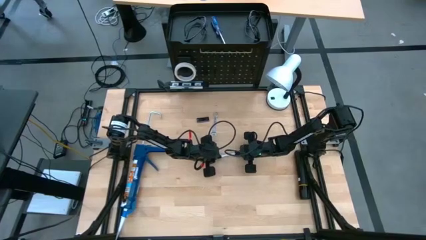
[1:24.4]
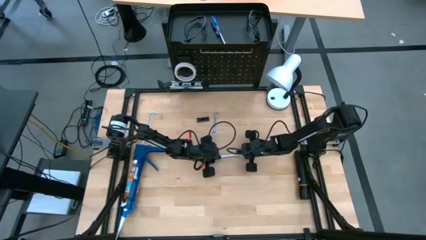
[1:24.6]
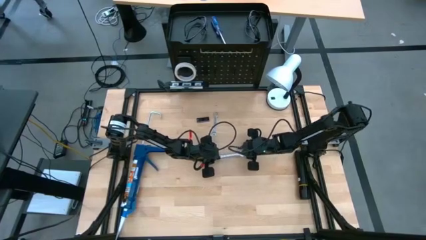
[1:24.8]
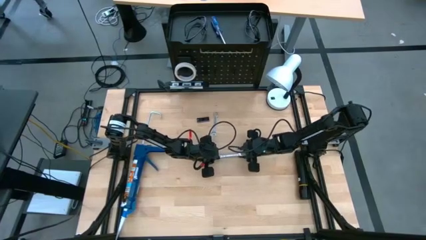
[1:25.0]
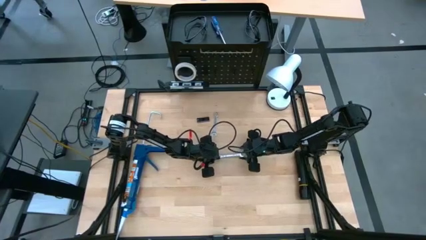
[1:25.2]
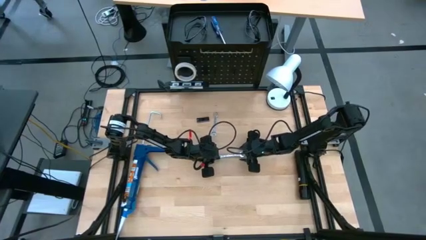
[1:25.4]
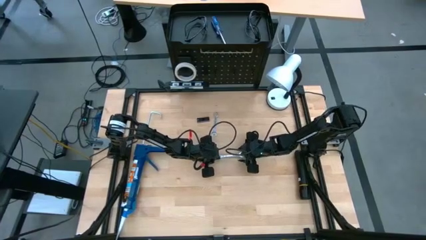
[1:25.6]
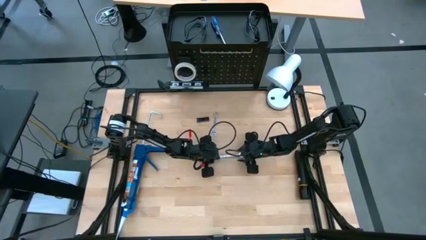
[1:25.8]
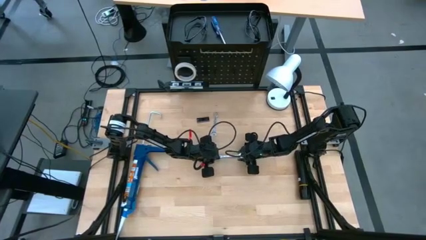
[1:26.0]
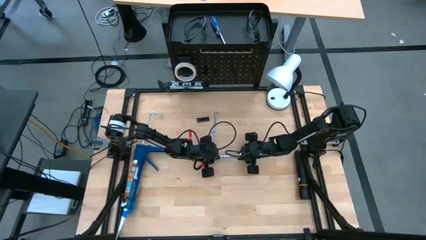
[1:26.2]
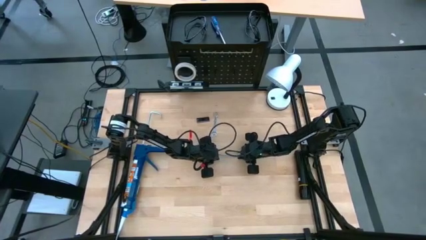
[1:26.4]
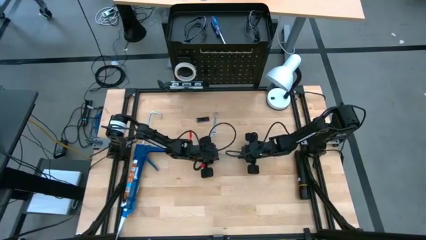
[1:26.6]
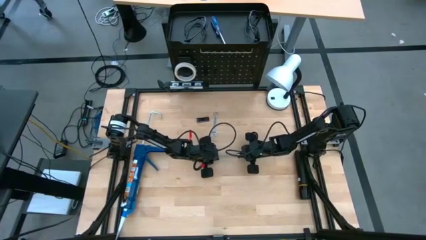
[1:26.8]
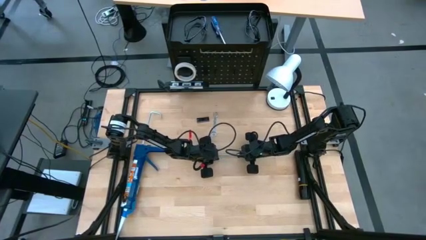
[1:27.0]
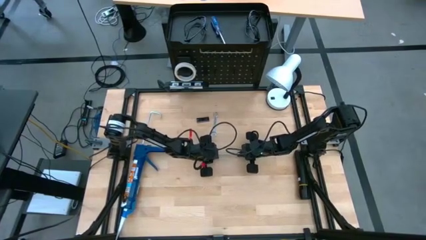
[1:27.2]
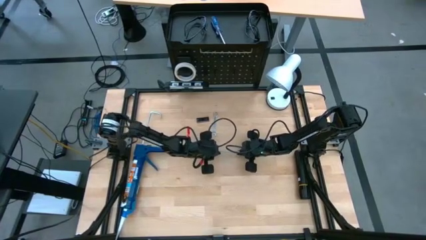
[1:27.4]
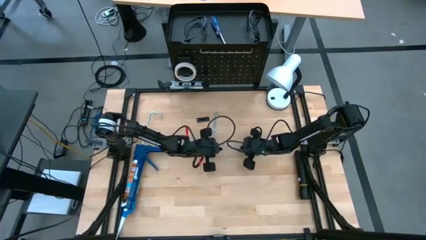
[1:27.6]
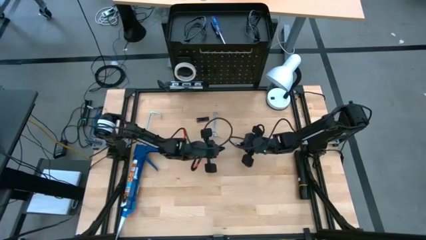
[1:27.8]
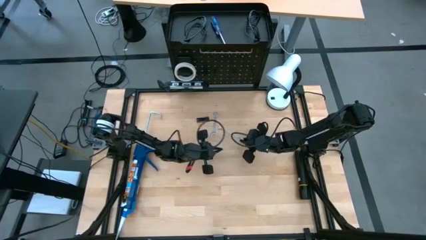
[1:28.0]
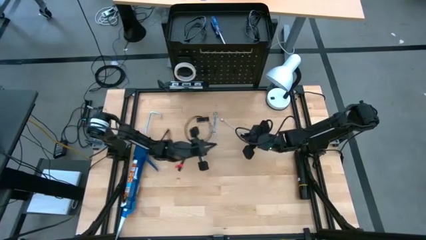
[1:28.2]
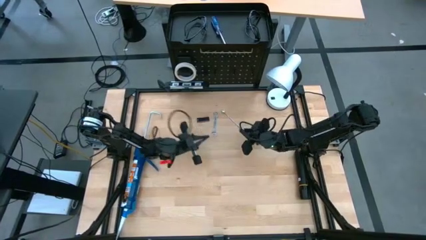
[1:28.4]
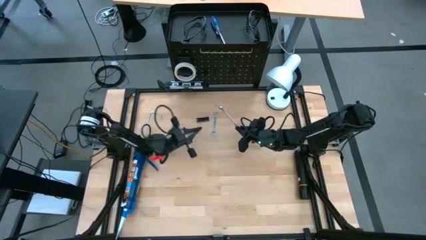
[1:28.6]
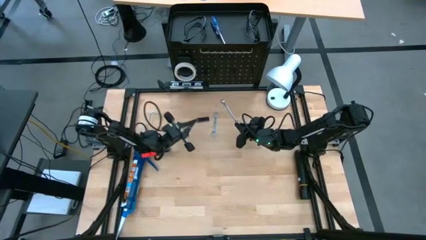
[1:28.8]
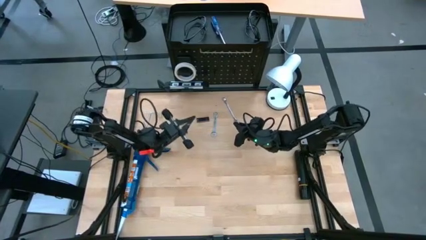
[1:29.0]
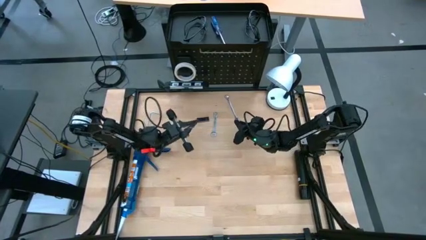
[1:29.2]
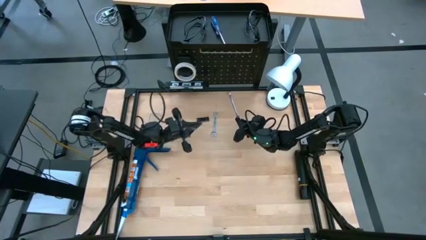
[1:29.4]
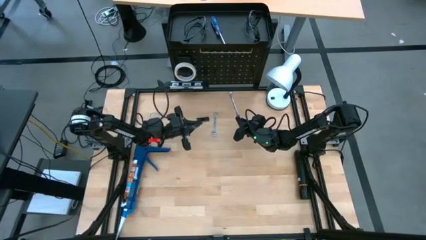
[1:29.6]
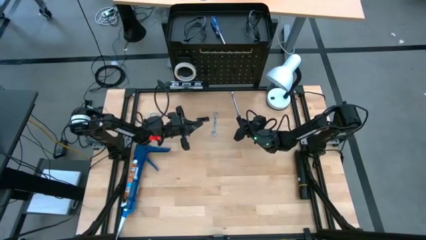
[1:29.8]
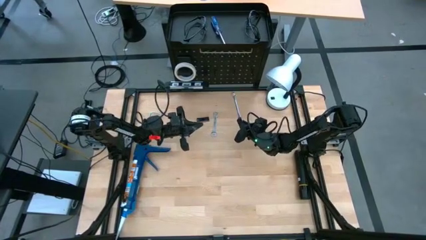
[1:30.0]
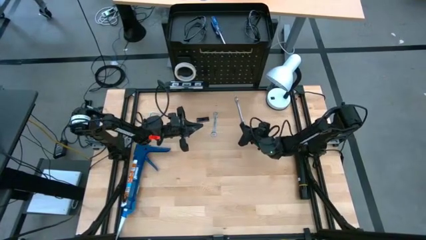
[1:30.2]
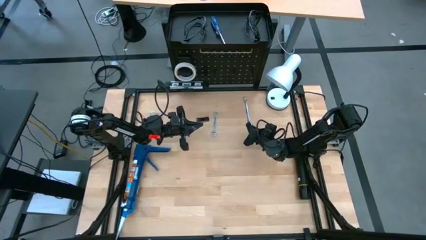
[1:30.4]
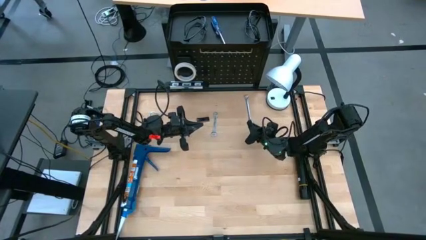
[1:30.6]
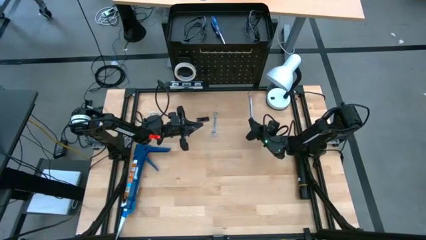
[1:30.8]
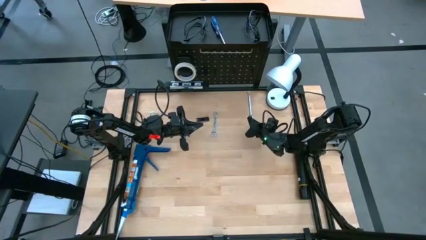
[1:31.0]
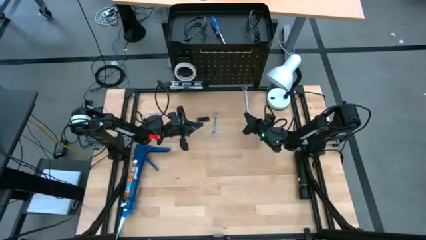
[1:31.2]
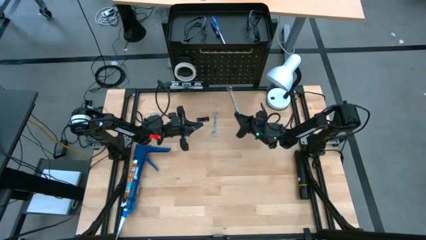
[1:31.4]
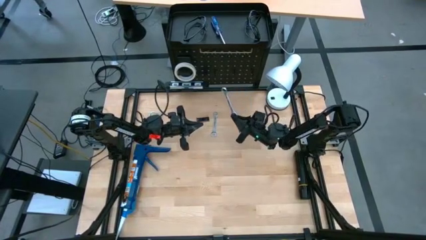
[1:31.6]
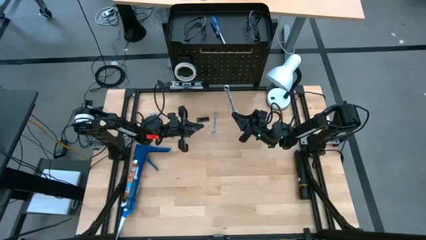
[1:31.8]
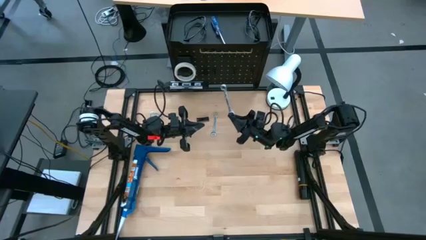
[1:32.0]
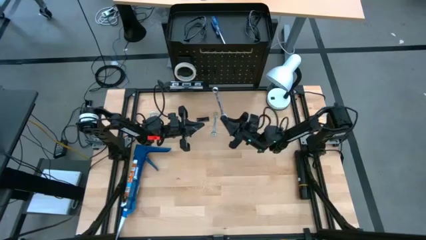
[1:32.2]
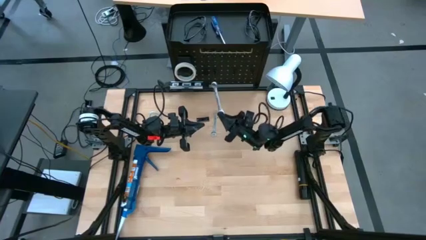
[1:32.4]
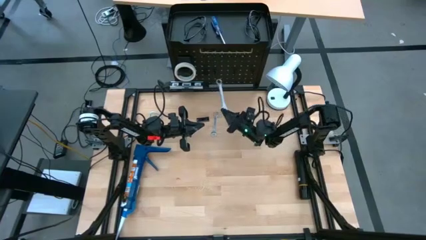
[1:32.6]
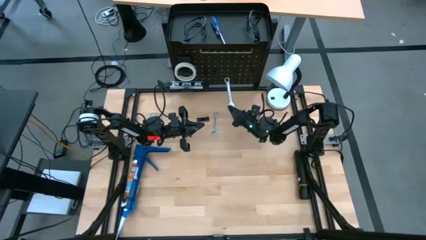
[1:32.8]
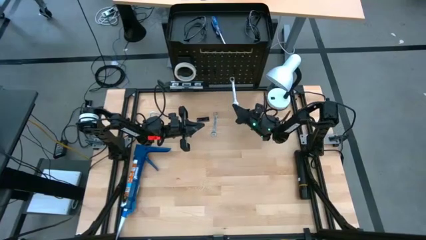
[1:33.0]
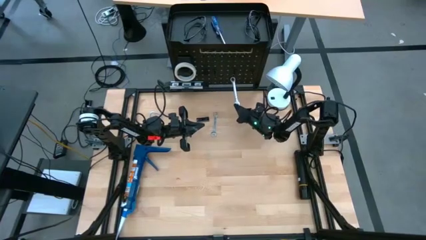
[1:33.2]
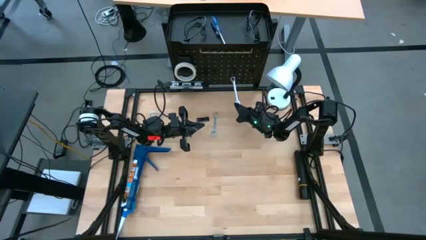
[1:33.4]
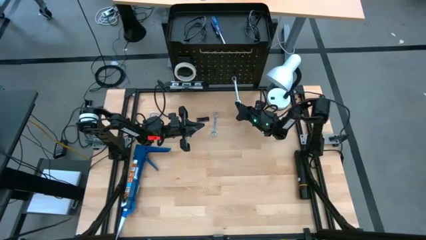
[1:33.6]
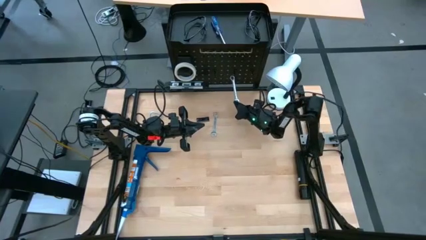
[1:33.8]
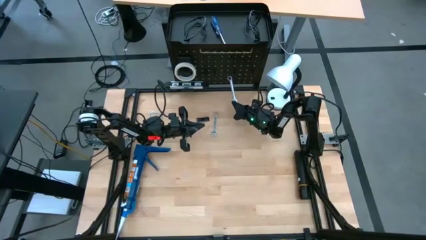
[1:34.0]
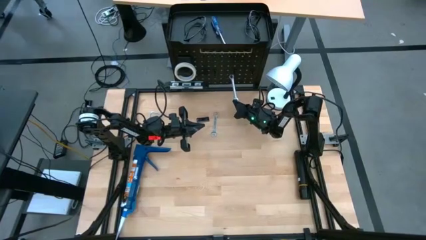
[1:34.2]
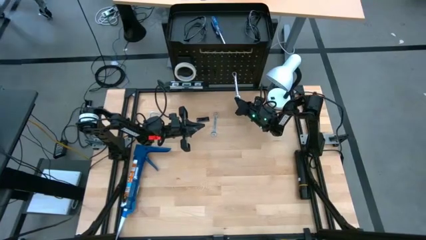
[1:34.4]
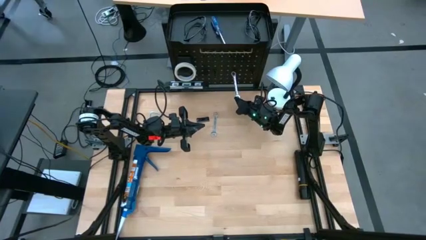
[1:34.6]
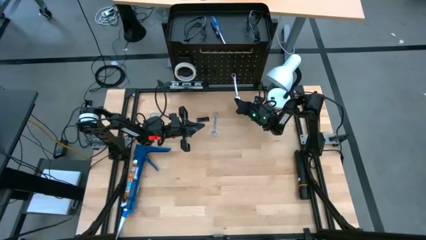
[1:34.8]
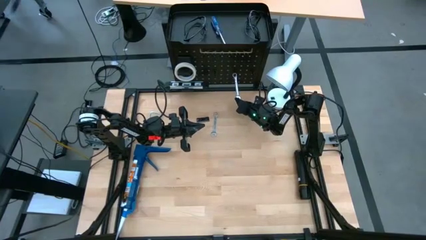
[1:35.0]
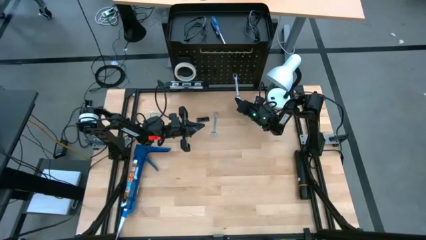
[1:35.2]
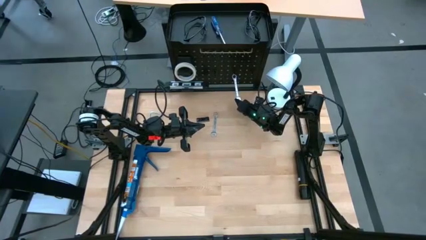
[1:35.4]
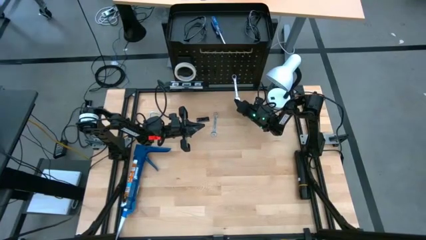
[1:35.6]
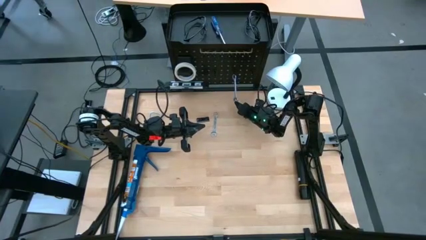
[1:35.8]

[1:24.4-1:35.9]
Task: Hang tools onto peg board
Hang the bottom wrench on the pegboard
